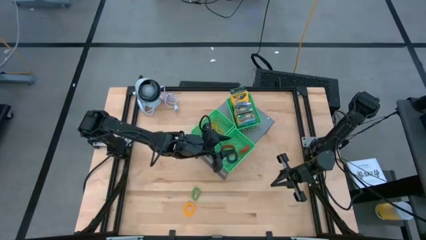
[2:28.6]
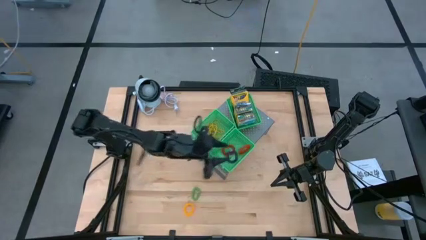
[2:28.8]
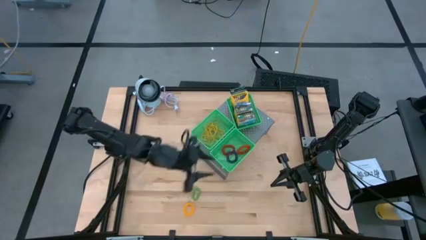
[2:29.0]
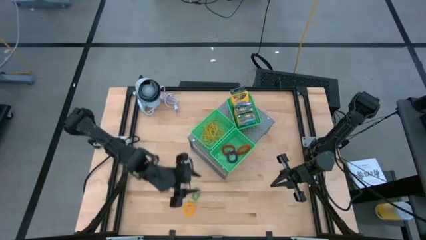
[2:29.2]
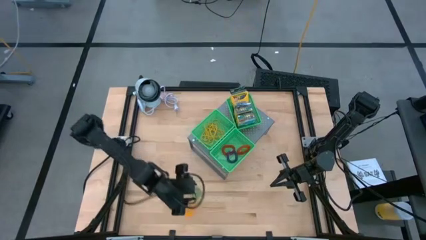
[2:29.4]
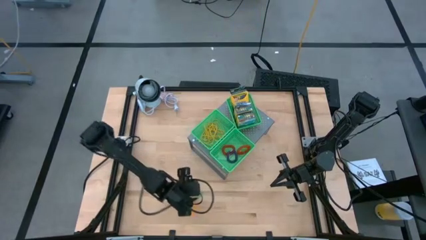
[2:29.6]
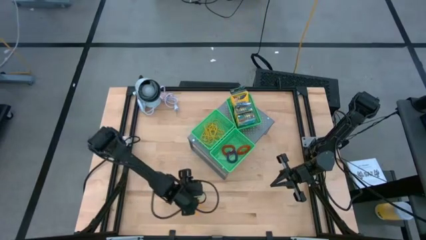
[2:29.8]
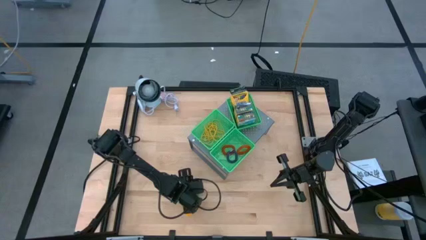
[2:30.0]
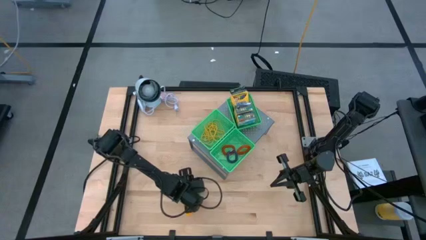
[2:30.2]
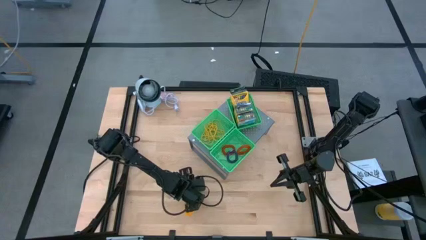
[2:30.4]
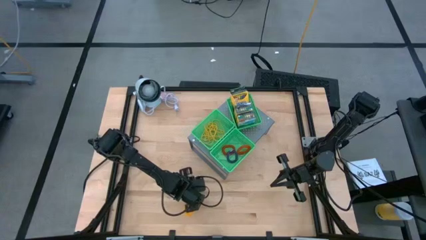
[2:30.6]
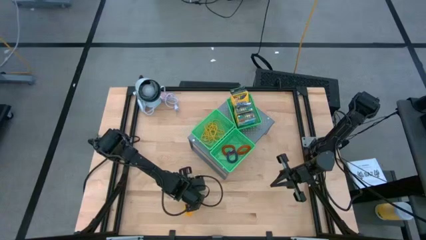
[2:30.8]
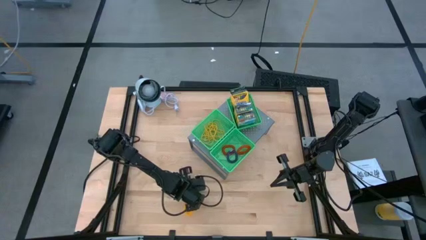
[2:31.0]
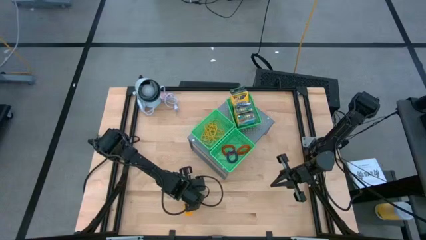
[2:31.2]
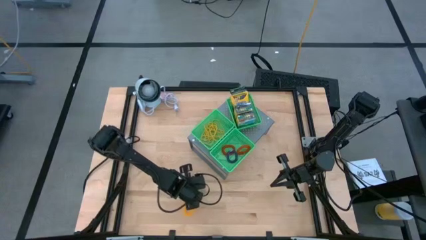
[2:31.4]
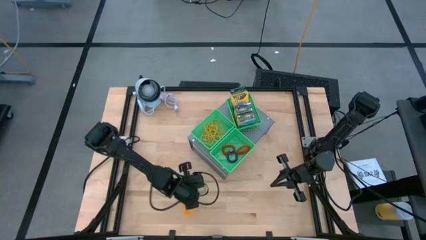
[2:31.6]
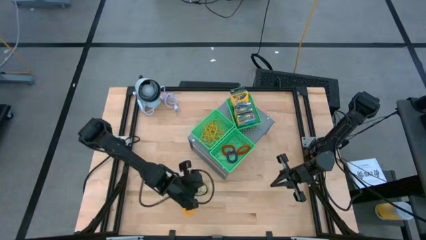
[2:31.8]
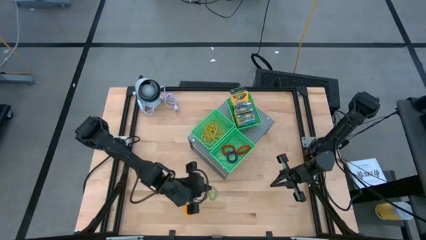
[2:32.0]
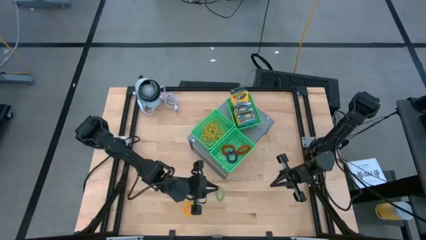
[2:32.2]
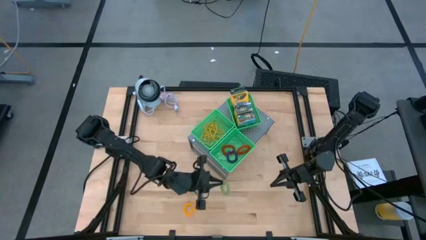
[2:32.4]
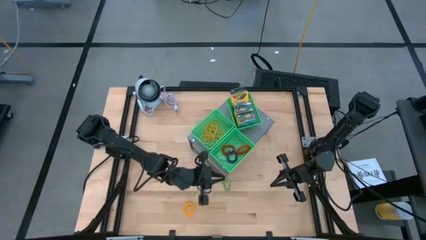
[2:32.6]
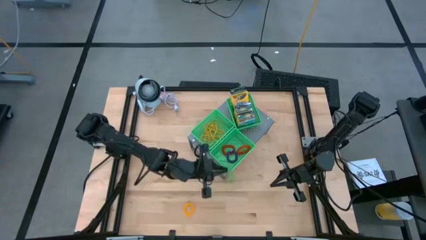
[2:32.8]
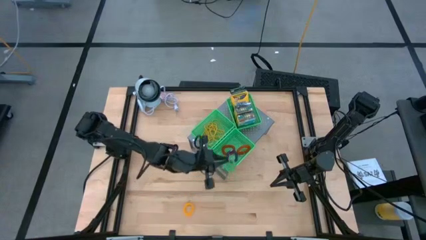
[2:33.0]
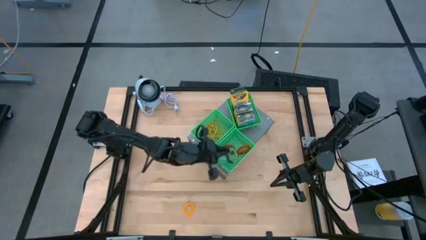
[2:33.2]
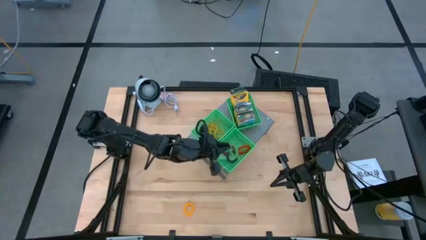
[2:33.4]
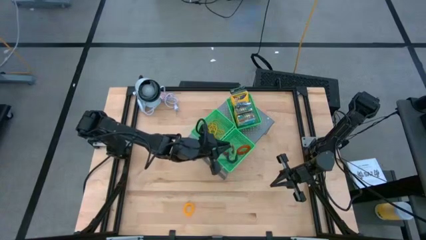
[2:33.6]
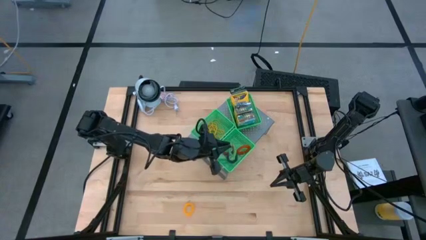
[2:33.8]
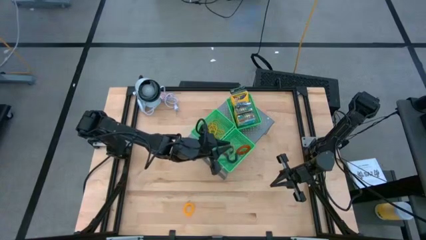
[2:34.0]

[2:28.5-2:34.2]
Task: Pick & Place Office Desk Supplies
Put the green spring keychain into the bottom green bin on the shelf

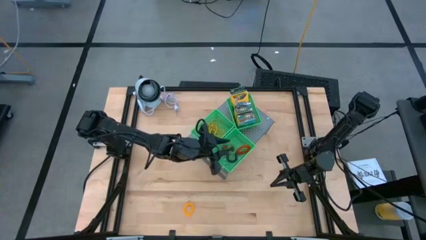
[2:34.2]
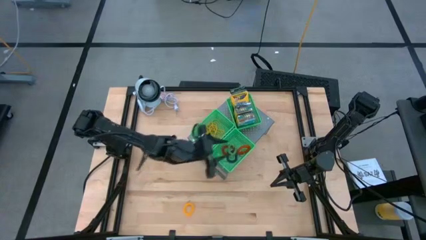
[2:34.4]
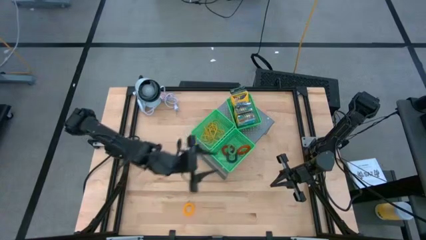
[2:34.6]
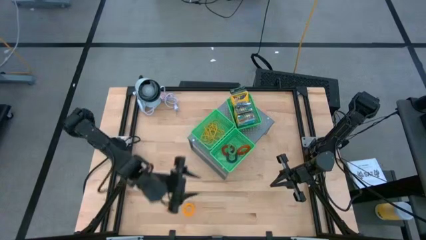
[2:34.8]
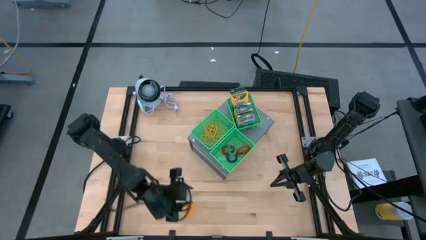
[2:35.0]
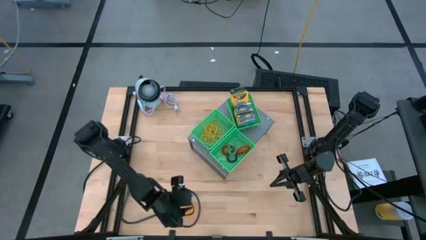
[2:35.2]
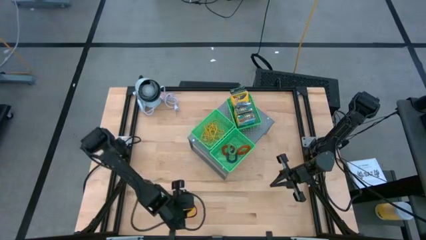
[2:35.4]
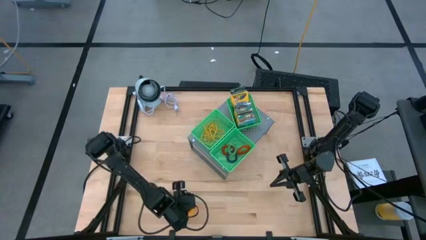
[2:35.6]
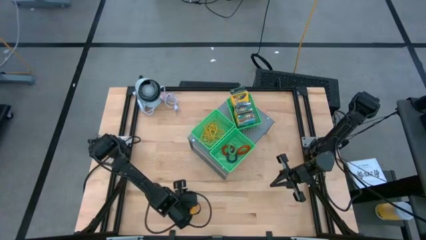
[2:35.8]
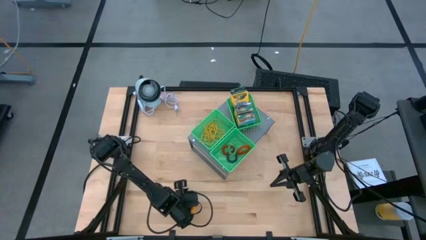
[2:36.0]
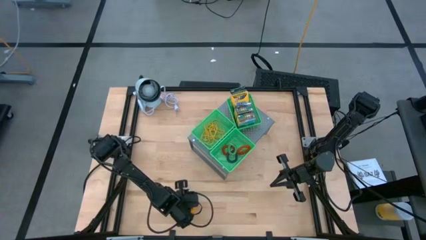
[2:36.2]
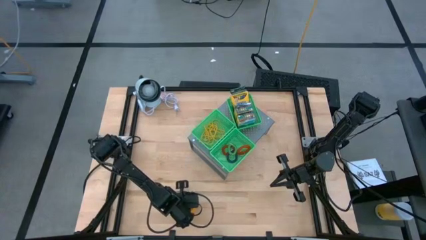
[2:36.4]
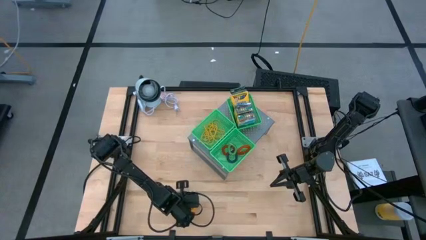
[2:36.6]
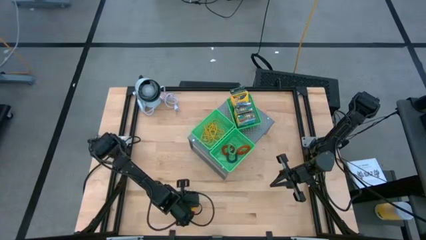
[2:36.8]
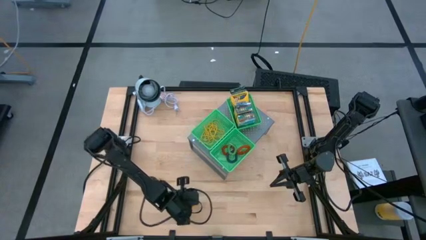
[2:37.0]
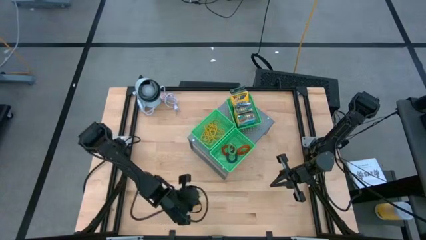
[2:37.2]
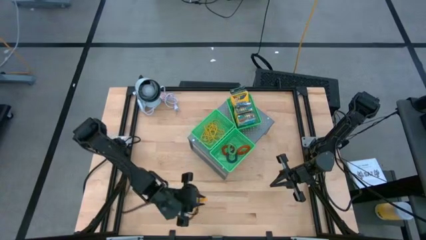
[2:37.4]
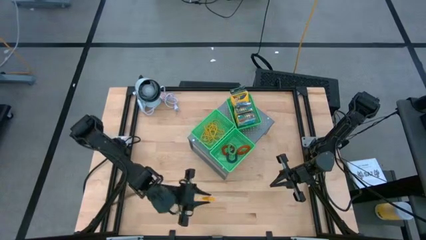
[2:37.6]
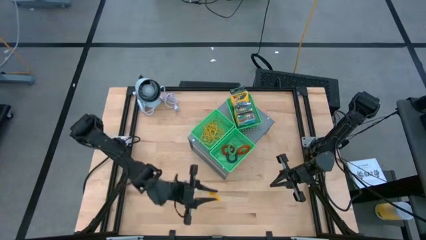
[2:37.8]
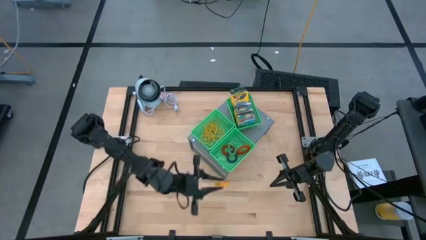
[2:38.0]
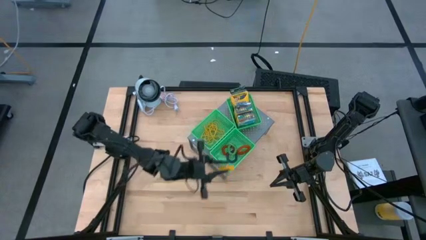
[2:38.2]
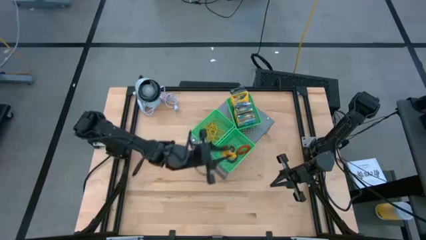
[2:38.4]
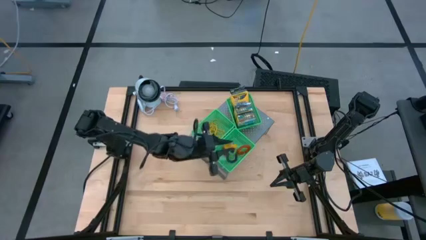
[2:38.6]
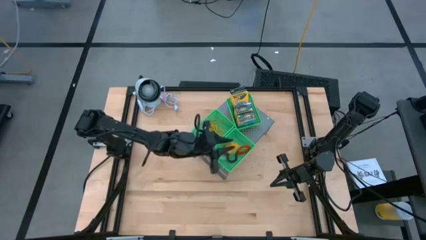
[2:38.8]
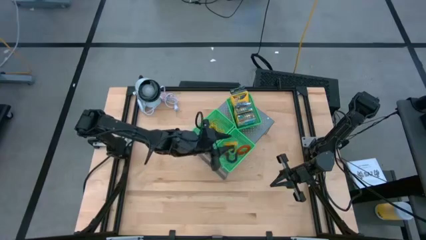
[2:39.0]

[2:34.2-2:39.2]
Put the yellow spring keychain into the bottom green bin on the shelf

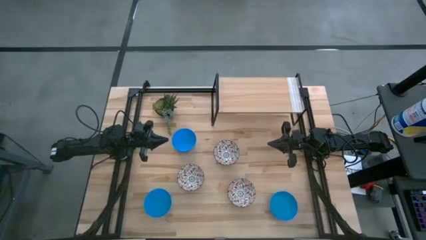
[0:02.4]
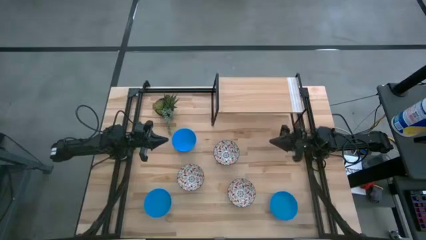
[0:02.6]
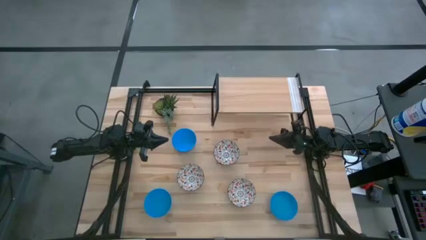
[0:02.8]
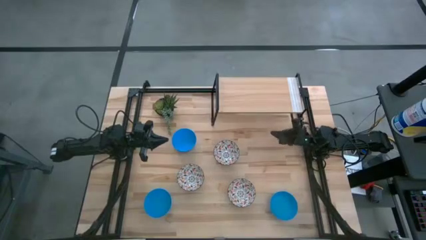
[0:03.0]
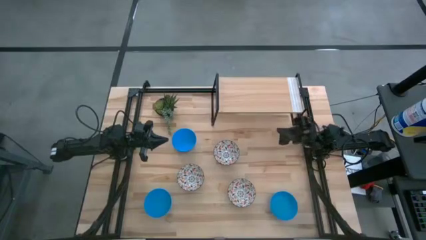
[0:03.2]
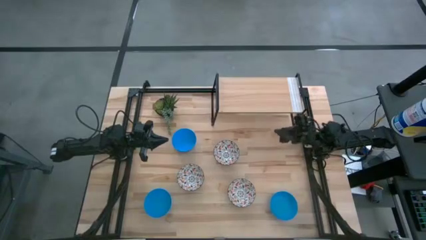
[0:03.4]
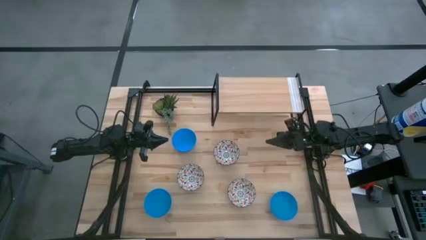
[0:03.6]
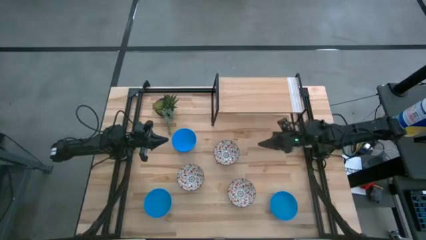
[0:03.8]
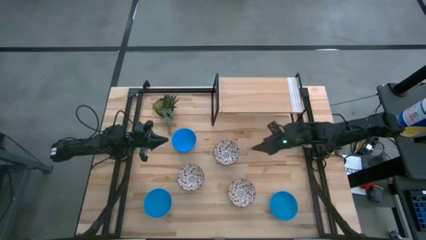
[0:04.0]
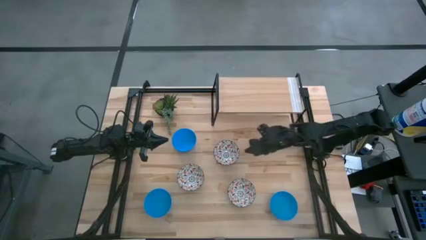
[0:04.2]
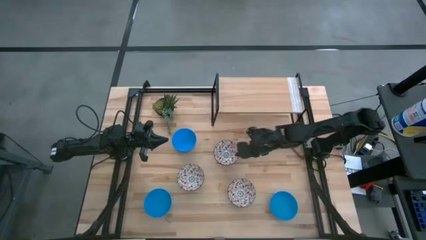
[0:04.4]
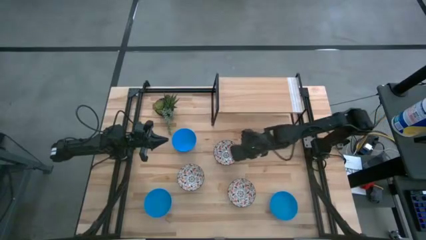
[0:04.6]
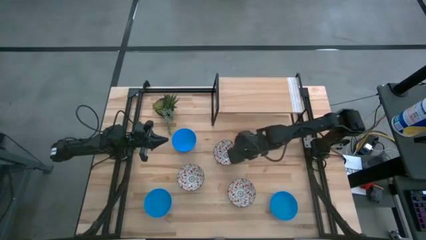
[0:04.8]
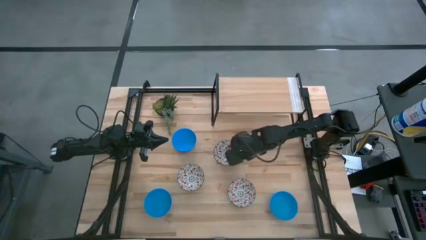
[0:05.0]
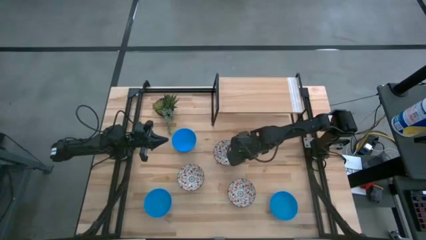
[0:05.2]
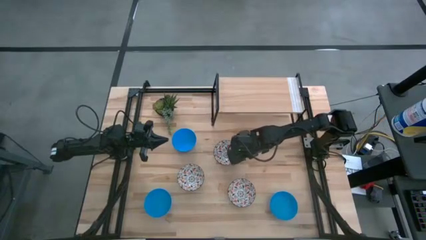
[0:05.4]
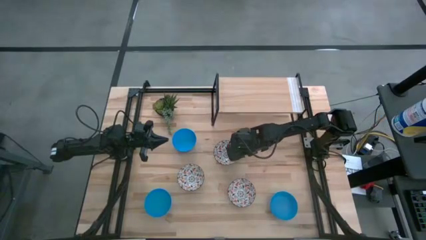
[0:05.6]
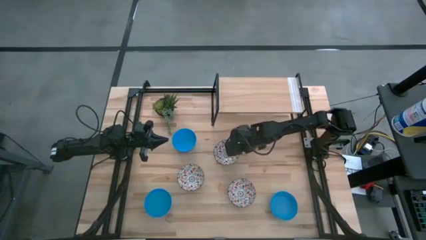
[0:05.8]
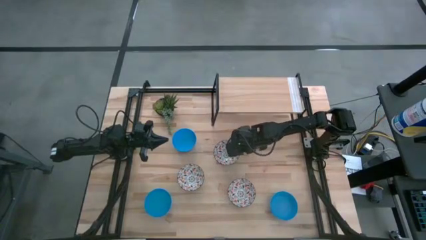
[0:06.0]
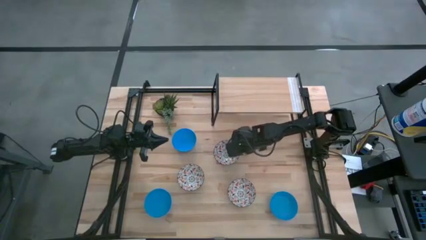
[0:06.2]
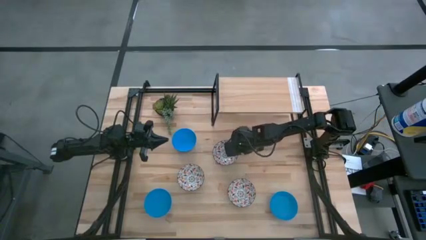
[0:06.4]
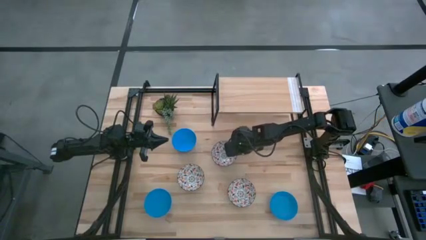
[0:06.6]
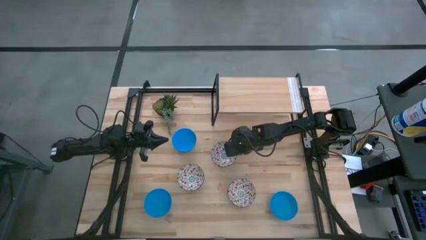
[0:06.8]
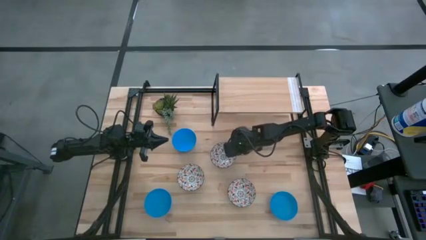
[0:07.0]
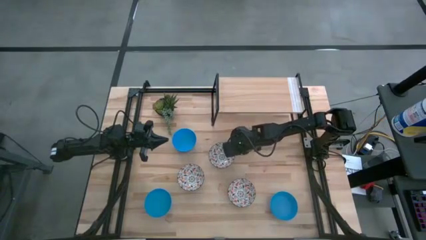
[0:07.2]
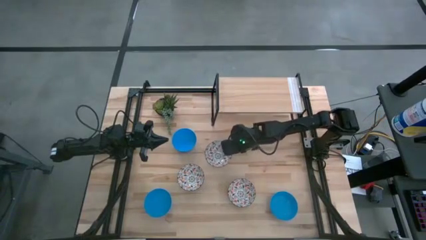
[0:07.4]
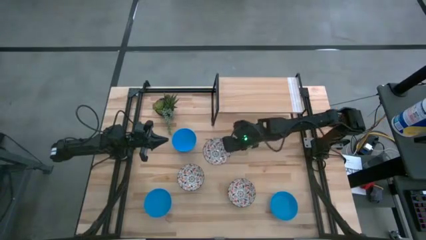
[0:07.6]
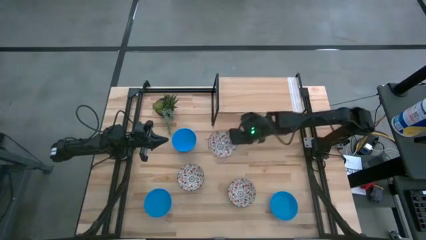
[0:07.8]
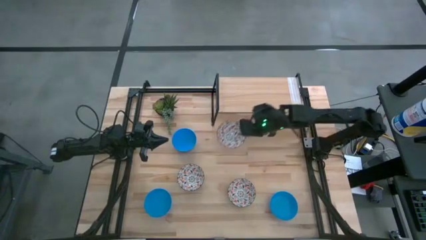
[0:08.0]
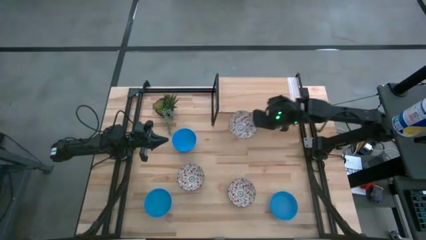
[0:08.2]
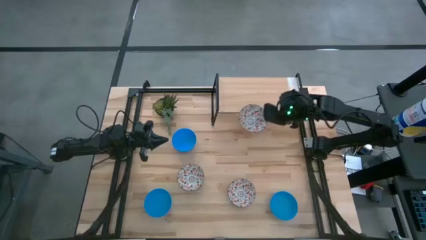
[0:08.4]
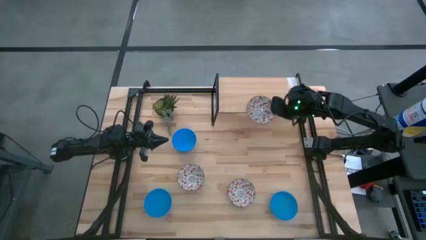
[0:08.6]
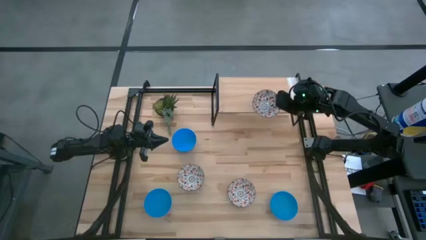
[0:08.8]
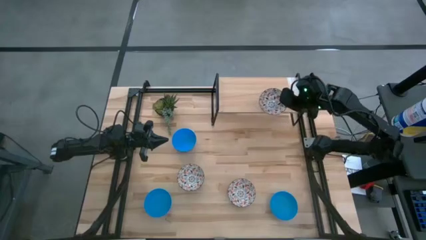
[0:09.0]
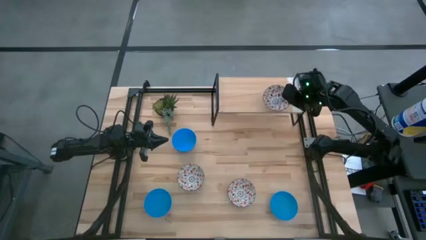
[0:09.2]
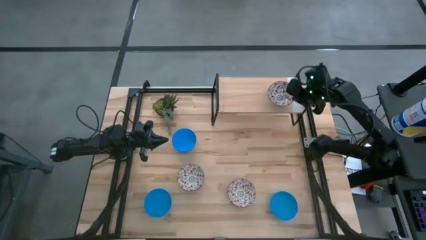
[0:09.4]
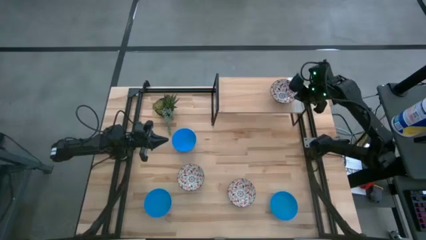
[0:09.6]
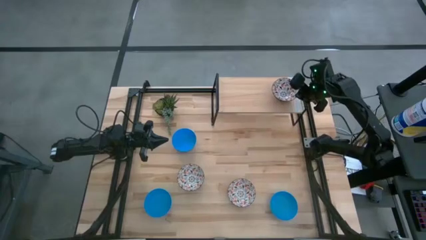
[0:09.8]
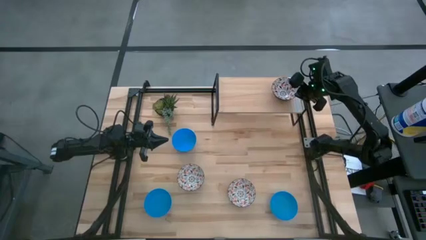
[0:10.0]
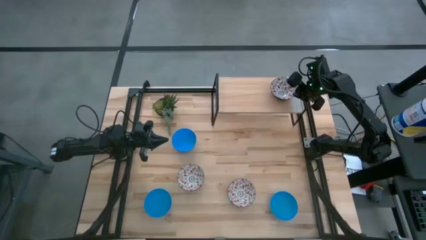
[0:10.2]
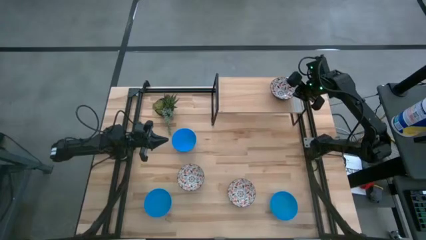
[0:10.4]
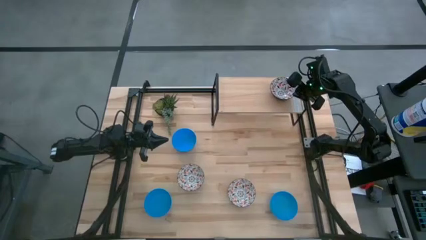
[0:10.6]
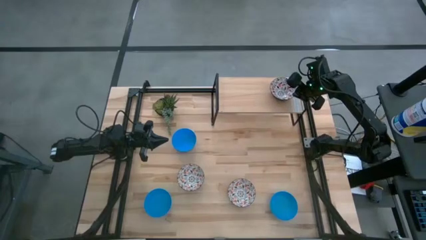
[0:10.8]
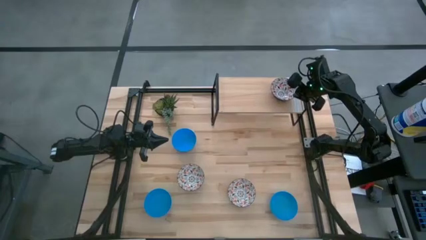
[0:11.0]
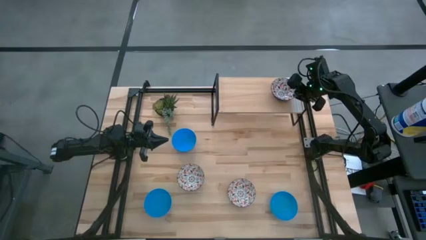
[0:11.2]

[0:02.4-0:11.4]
Task: Pick & Place Mini bowls
Put the top white patterned bowl on the shelf
